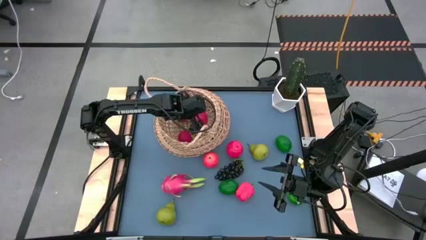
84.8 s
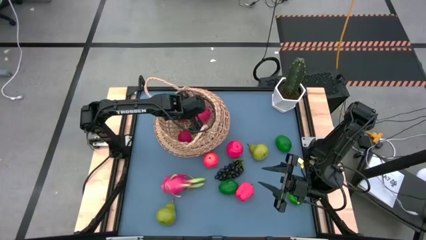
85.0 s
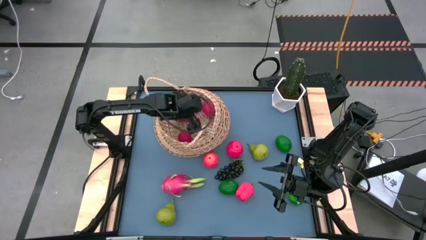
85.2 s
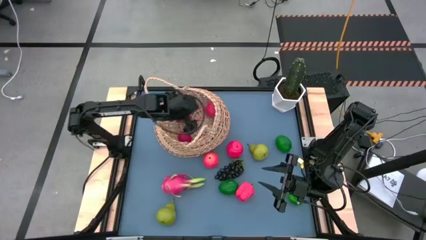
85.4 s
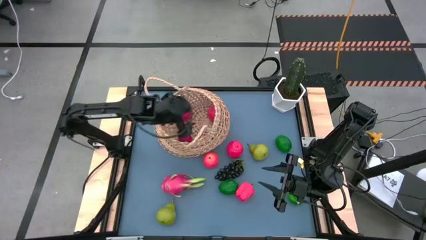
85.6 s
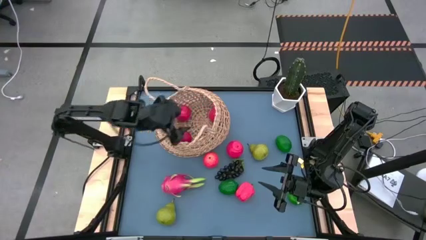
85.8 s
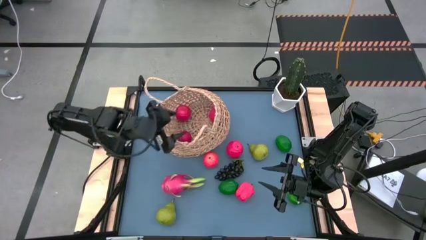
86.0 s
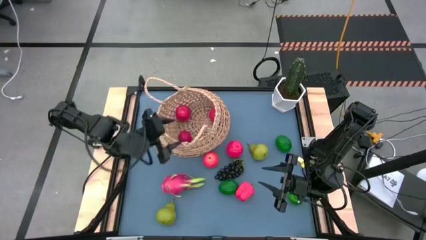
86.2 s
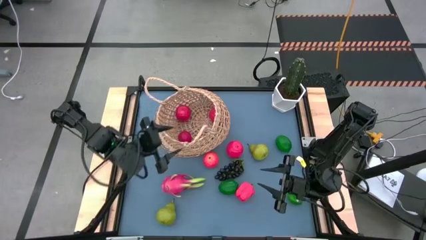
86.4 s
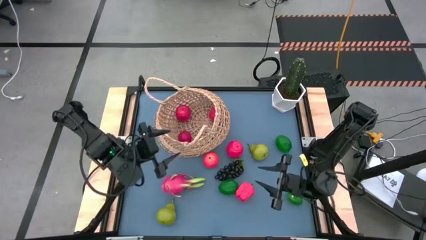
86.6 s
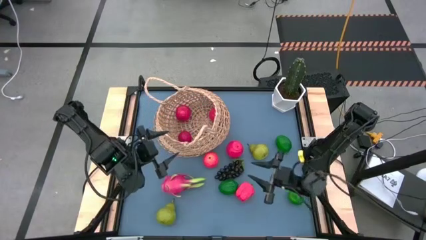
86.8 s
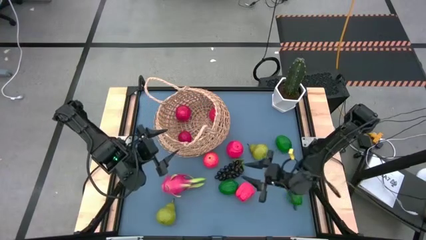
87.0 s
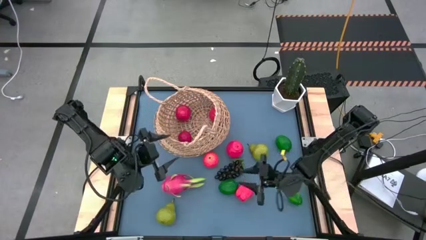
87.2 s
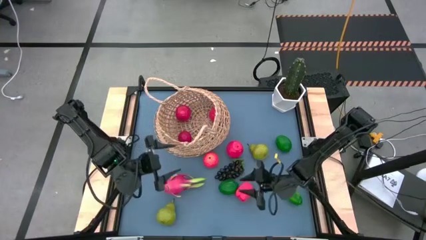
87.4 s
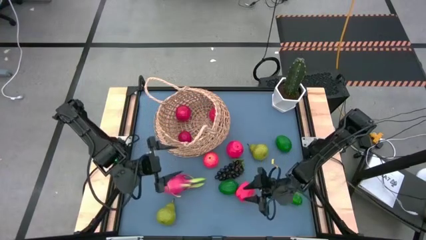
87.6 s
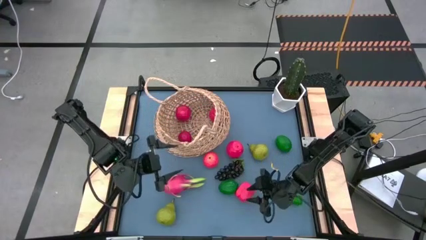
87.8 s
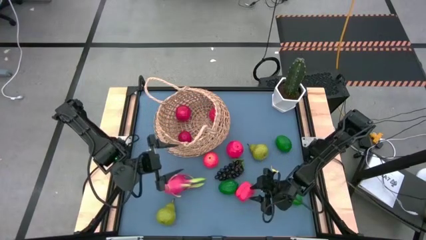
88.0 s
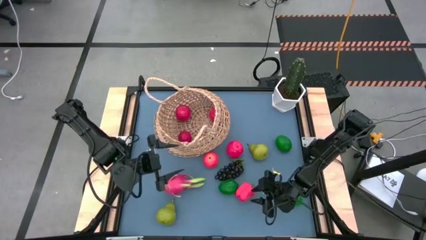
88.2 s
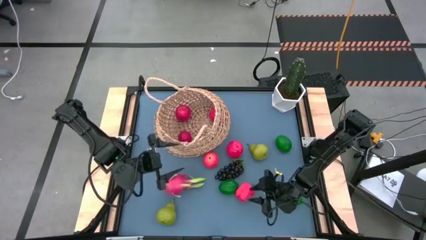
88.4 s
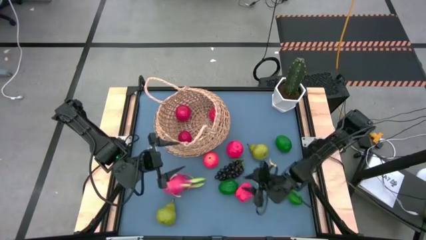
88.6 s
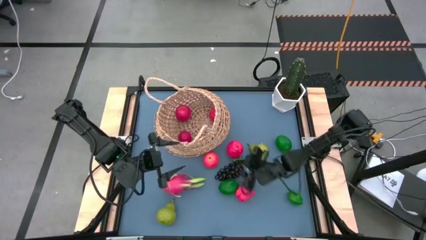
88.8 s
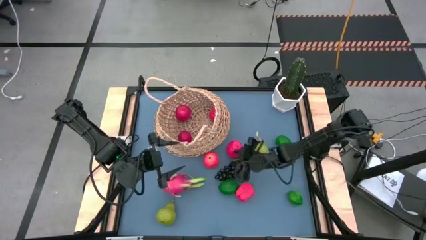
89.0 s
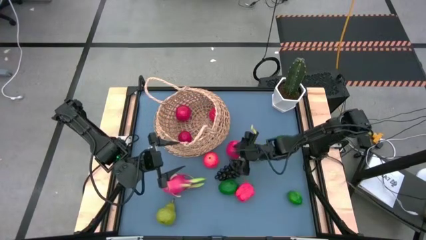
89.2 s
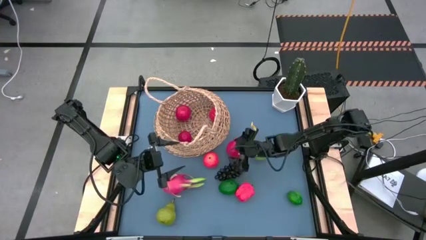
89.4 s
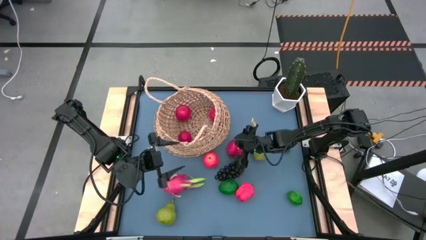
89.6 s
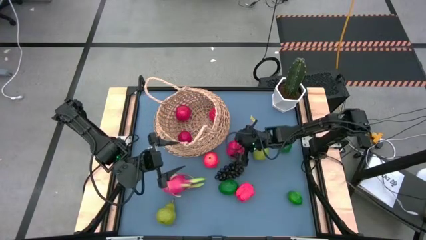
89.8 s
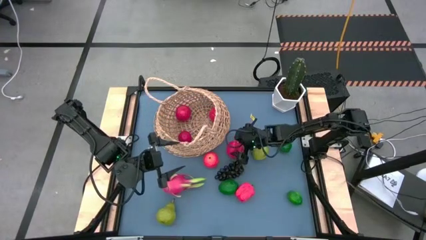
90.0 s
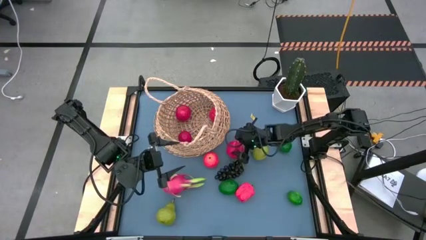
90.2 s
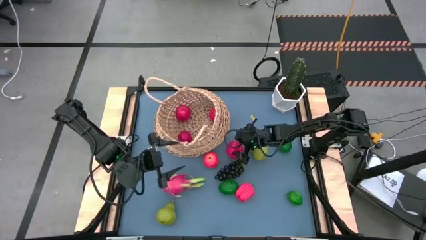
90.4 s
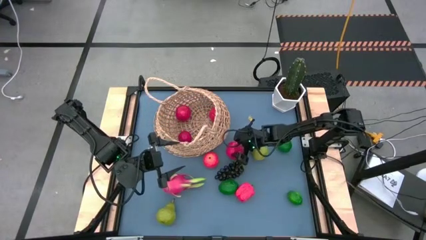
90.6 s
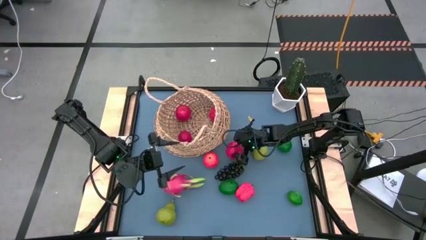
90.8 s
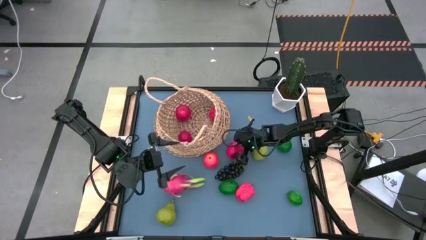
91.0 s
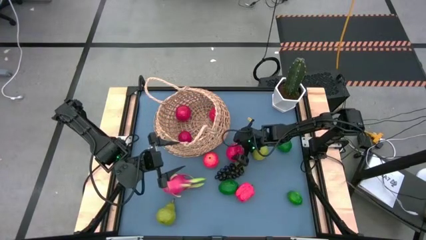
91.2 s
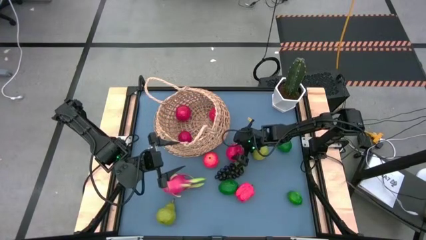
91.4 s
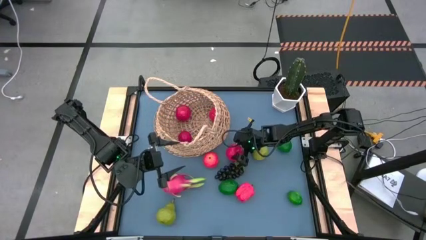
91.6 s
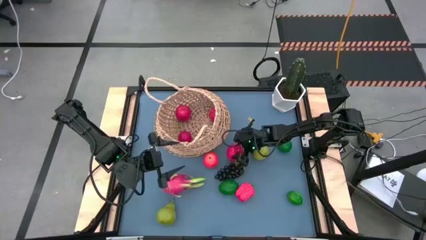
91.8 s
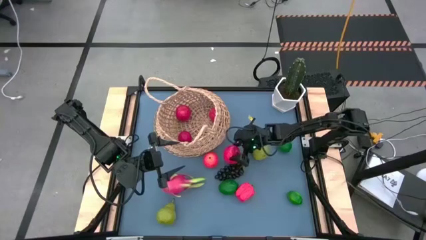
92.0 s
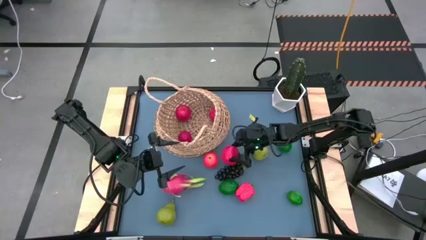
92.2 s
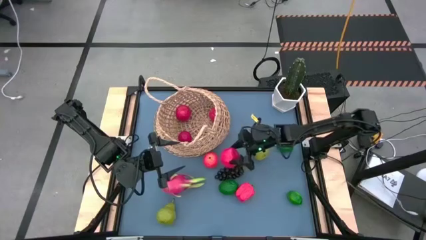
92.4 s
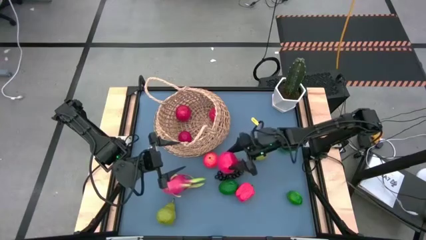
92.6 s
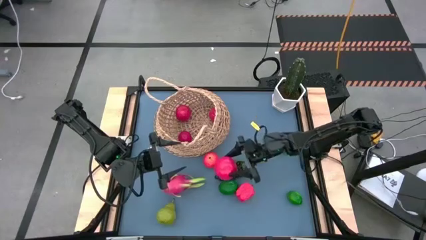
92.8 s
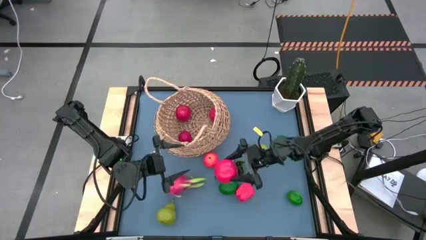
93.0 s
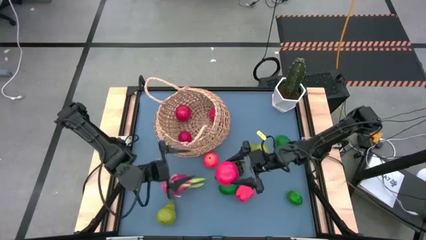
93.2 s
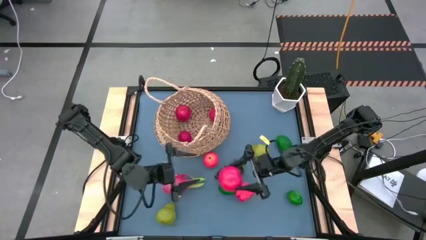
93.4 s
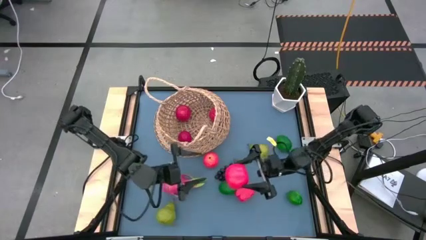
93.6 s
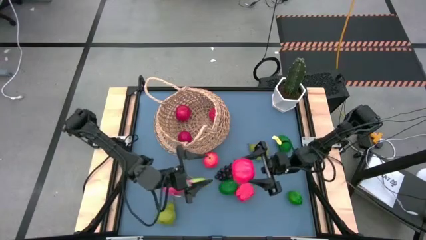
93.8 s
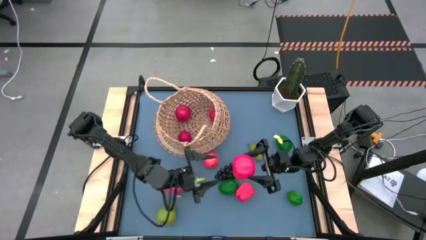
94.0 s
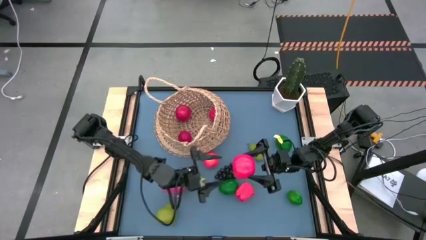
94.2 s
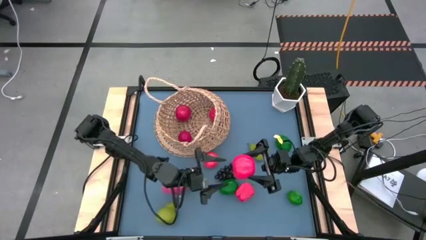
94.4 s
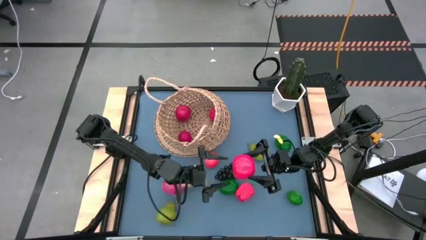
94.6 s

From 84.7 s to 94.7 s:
Task: Build produce basket
Put the red apple into the basket
